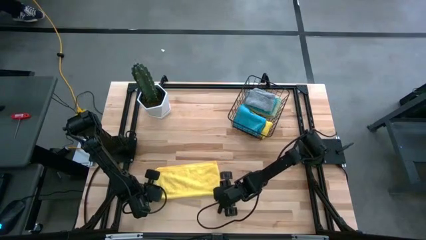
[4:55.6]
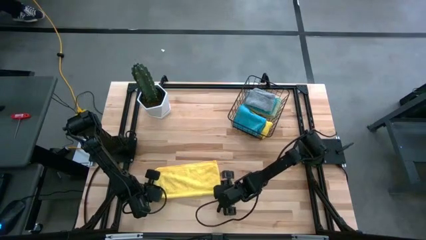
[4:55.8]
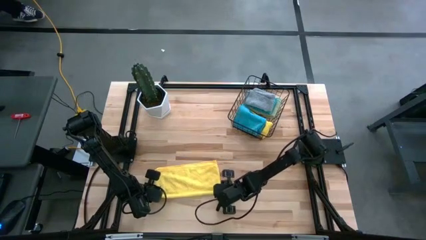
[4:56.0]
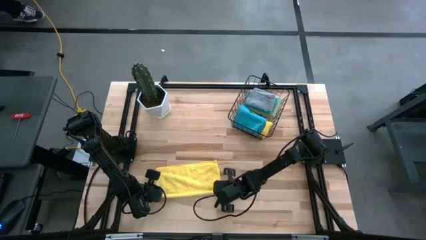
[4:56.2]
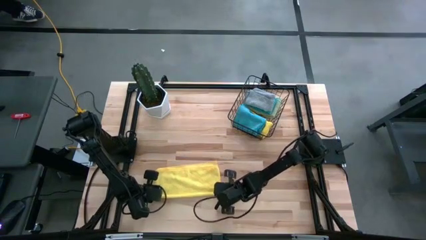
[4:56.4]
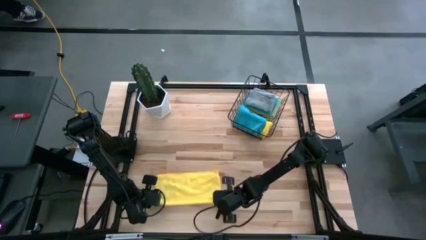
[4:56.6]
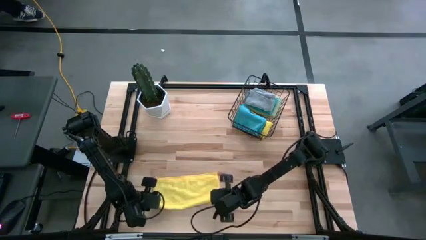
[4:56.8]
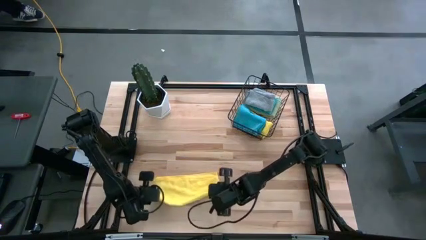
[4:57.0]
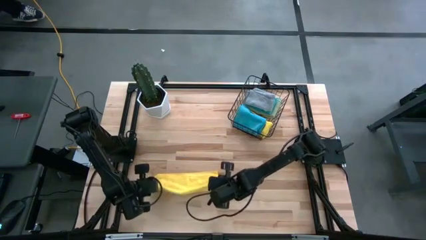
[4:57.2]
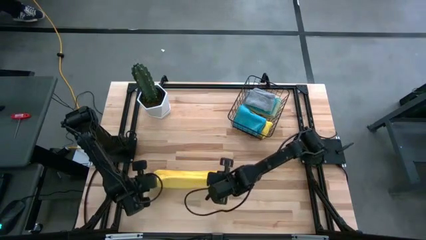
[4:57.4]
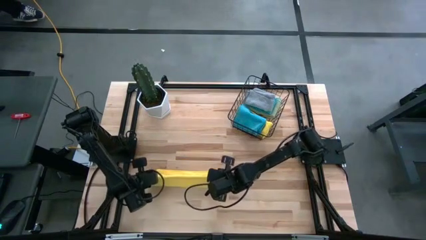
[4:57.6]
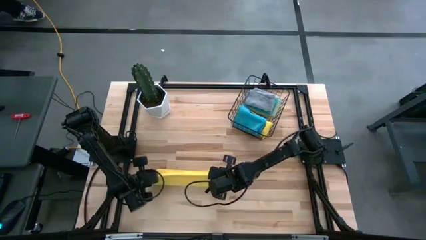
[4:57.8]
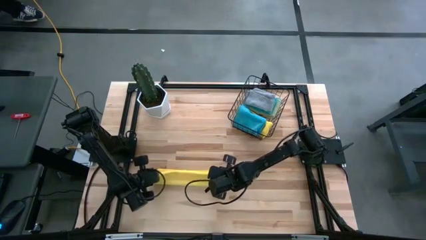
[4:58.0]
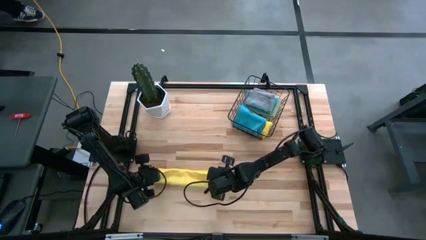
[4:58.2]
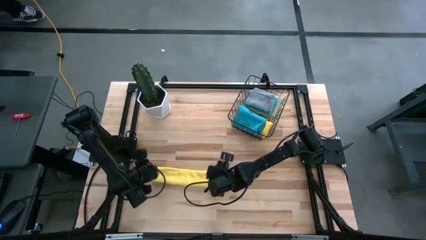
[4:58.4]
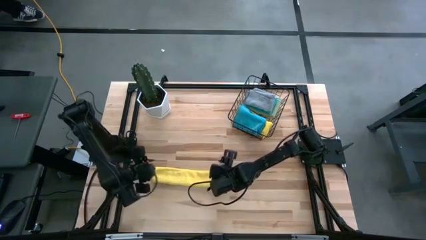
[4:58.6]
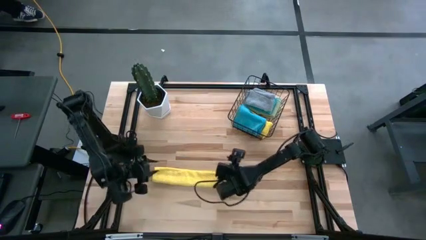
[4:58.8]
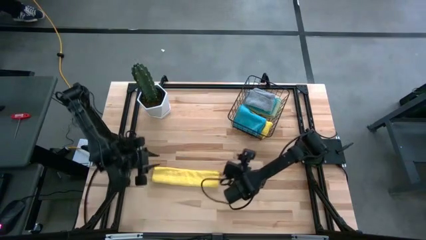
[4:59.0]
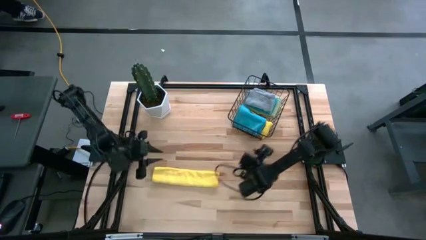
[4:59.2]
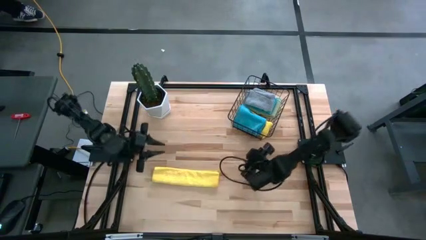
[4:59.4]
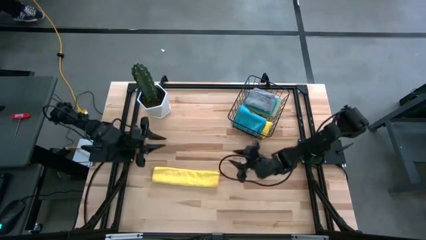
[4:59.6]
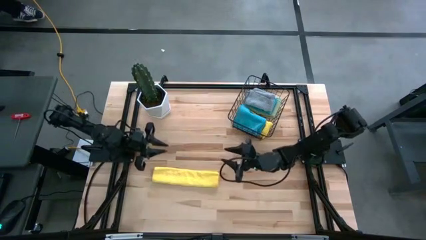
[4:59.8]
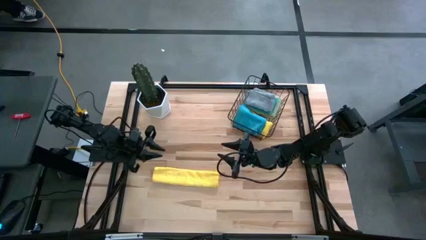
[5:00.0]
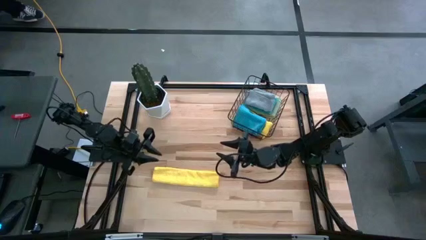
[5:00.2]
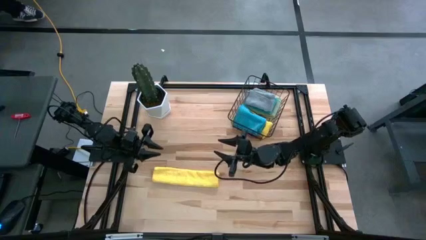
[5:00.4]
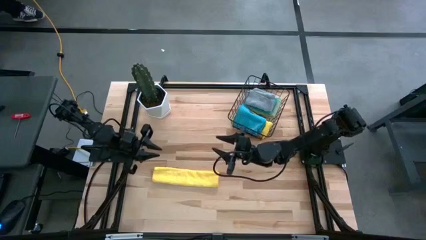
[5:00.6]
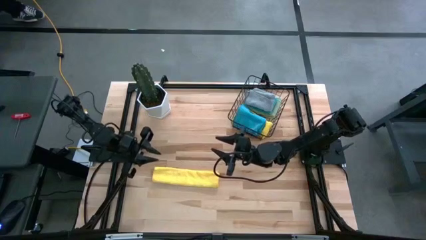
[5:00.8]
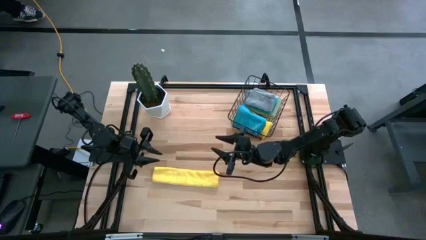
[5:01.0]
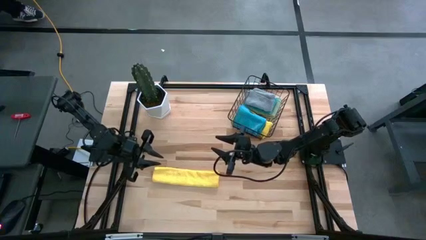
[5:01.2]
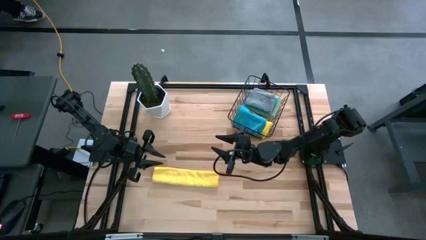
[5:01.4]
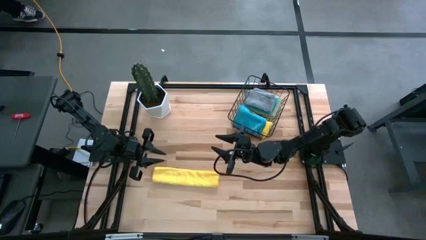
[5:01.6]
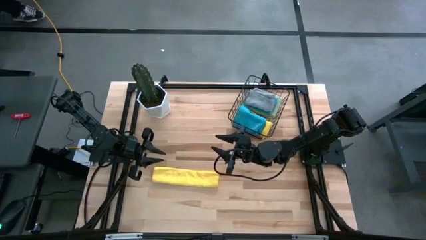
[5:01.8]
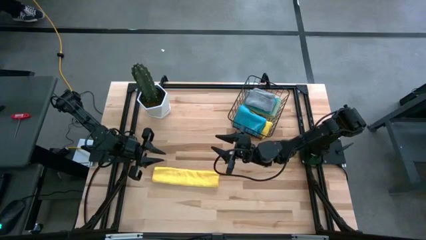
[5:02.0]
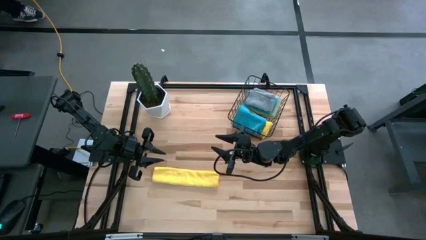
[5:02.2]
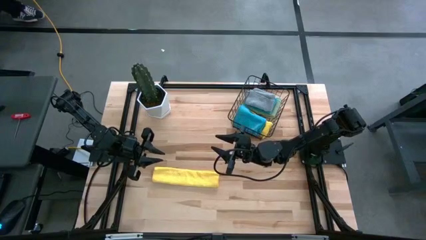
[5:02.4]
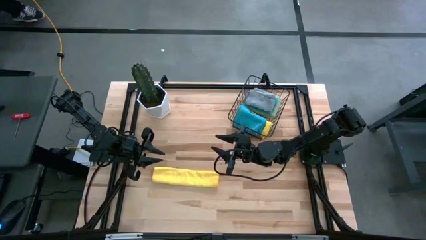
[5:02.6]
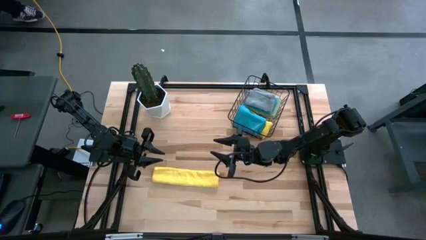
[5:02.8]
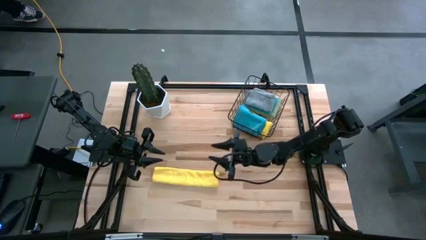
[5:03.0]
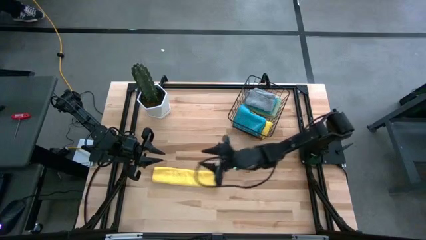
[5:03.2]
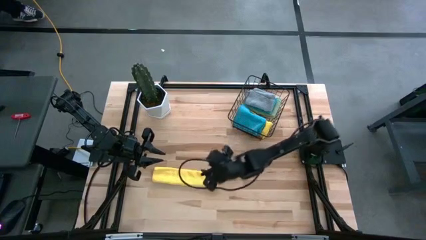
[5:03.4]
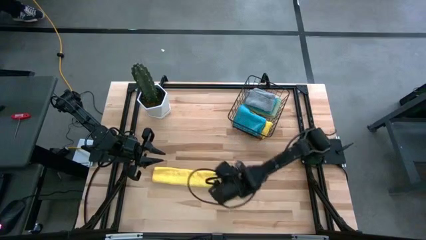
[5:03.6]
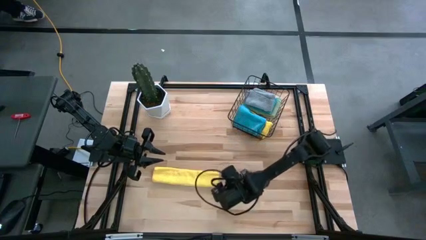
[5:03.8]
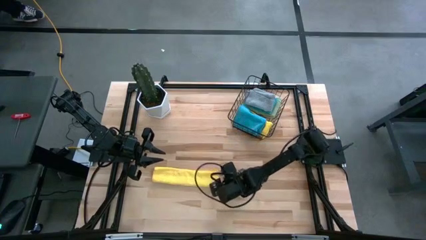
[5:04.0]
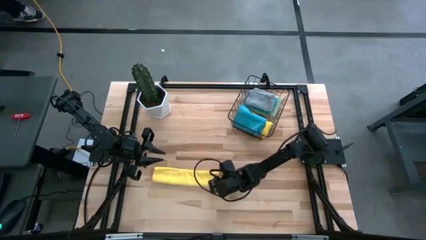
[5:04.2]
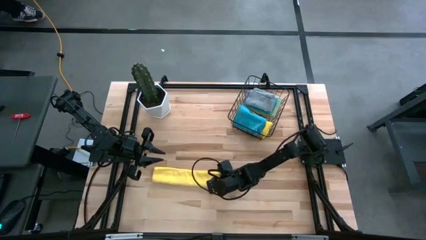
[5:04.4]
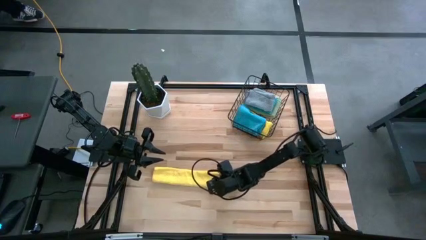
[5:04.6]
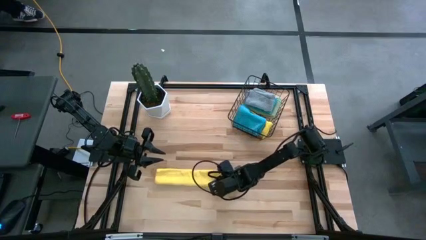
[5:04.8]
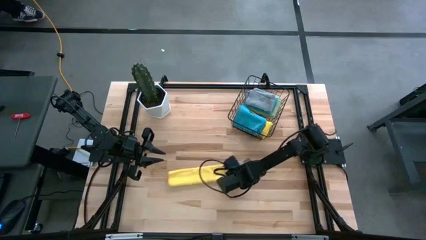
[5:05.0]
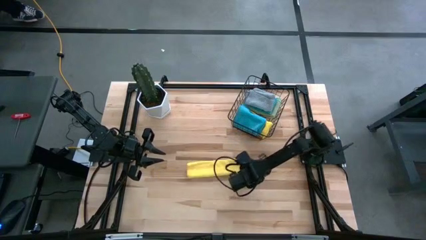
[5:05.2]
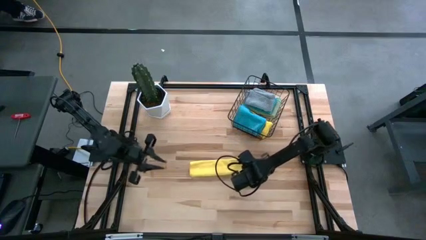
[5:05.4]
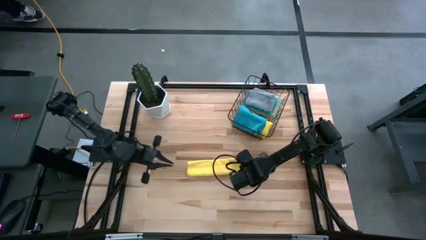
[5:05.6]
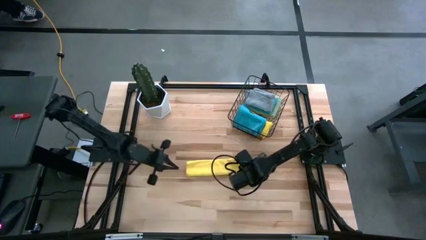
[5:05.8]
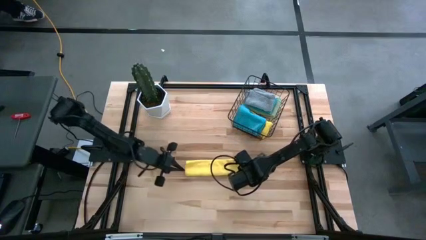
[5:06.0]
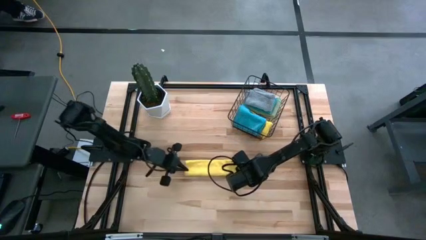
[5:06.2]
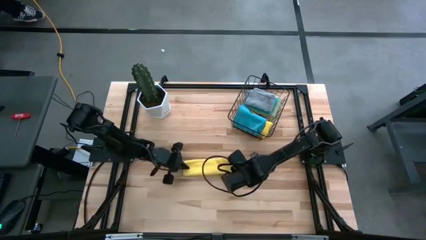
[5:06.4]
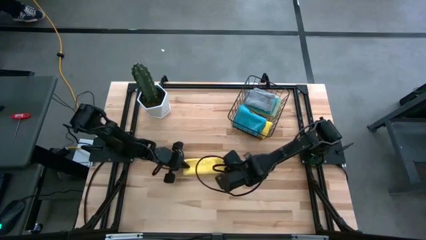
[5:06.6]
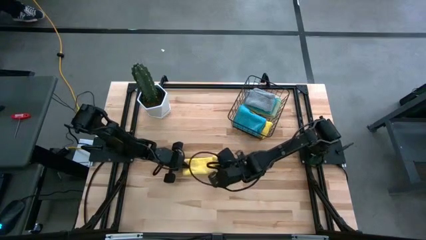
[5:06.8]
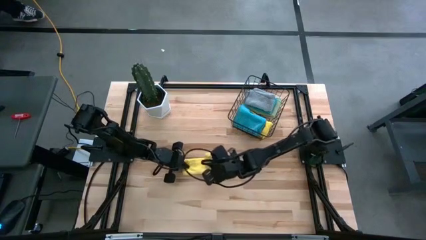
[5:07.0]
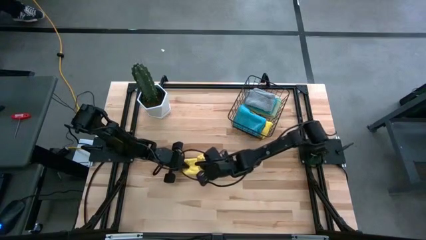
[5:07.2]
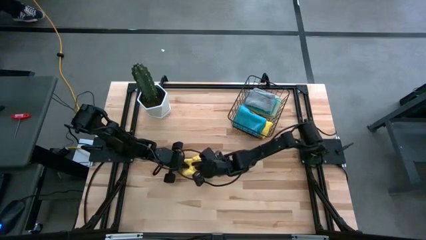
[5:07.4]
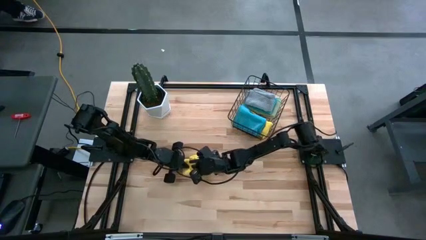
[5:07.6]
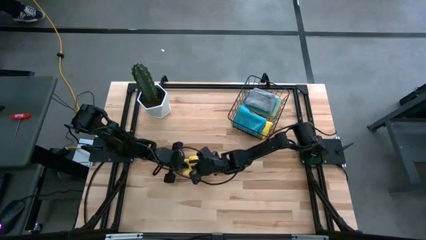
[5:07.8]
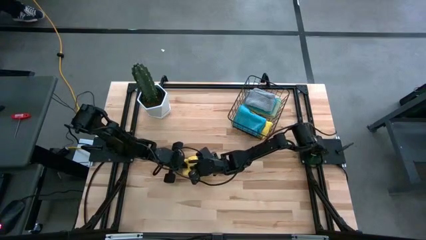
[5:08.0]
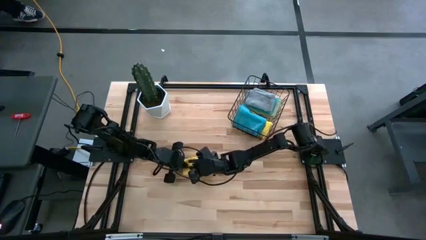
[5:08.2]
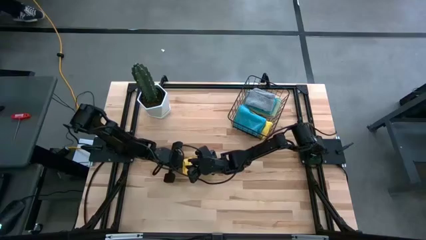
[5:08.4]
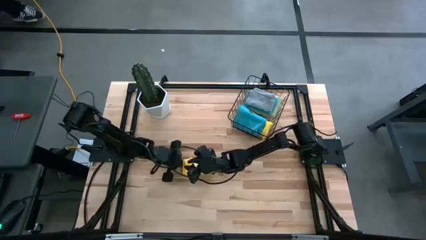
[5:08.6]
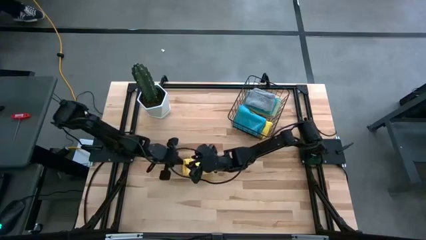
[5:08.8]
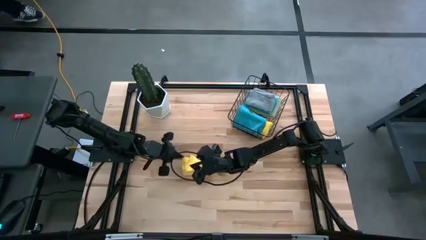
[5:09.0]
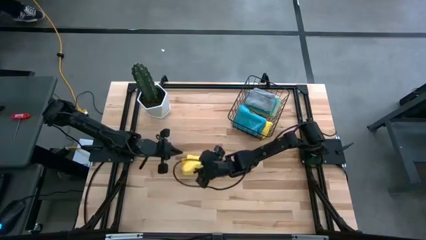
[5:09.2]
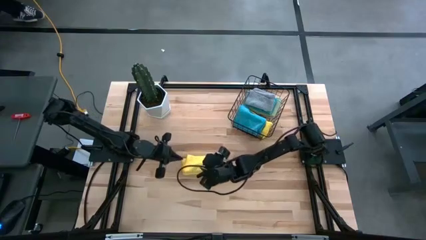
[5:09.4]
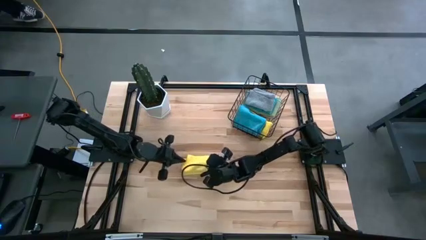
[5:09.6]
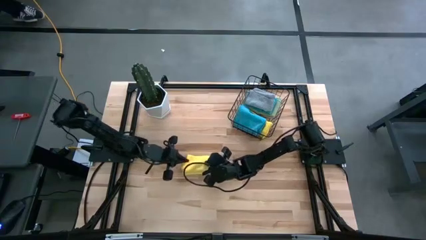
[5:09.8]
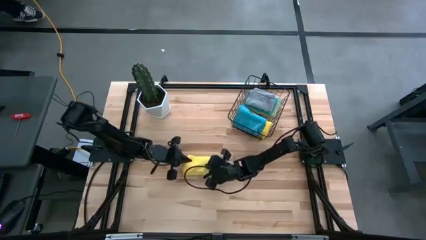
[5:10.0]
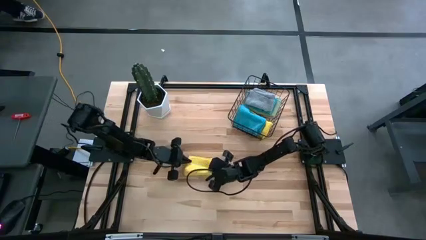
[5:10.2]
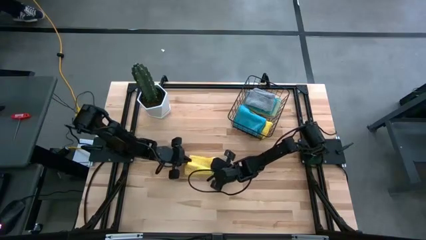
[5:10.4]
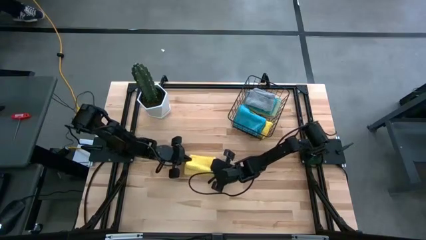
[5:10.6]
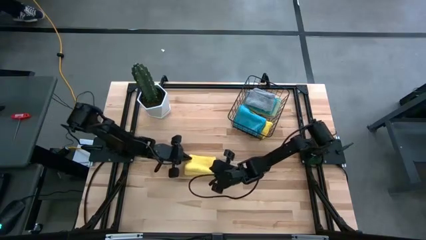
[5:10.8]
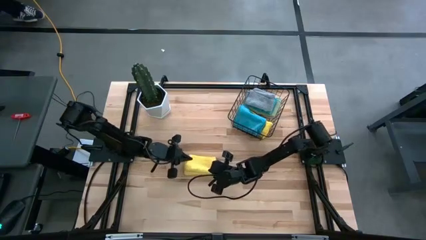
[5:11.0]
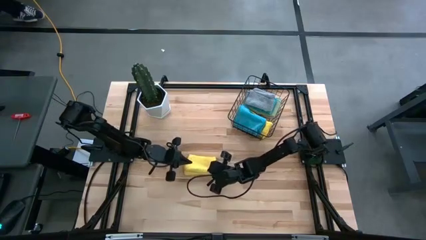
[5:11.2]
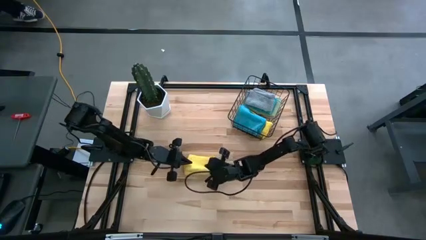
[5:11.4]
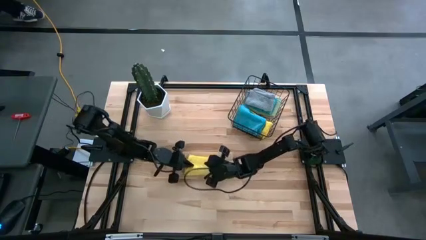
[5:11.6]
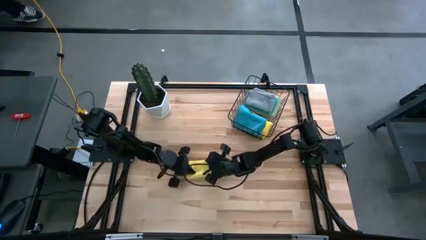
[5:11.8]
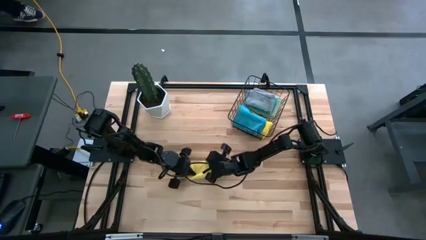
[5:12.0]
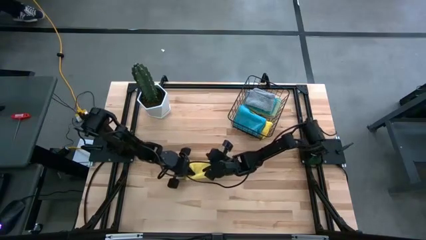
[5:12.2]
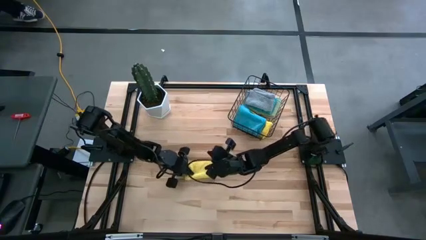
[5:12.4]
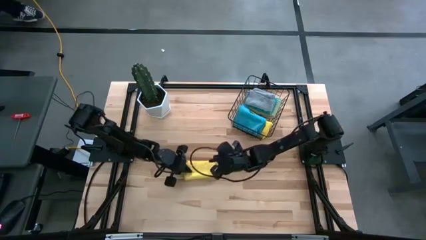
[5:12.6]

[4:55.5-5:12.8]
Task: Fold microfiber towels
Fold the yellow microfiber towel
